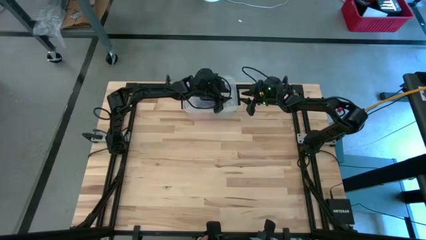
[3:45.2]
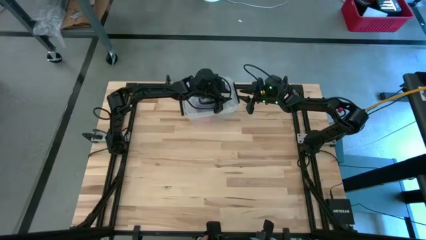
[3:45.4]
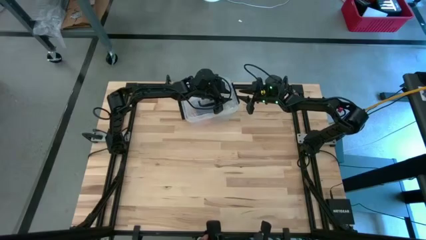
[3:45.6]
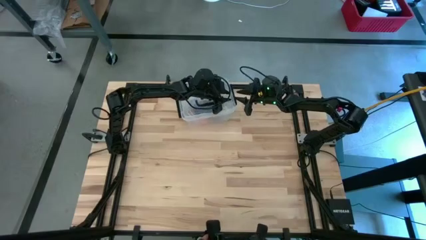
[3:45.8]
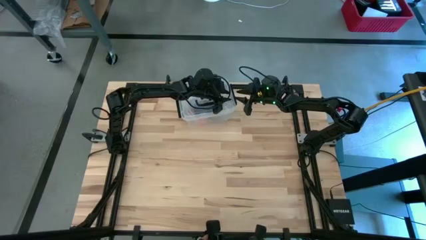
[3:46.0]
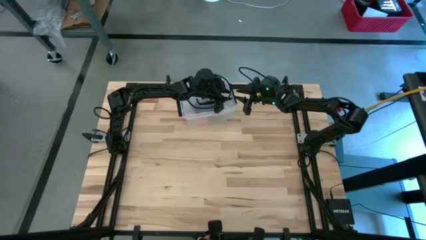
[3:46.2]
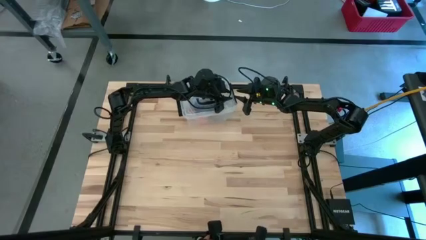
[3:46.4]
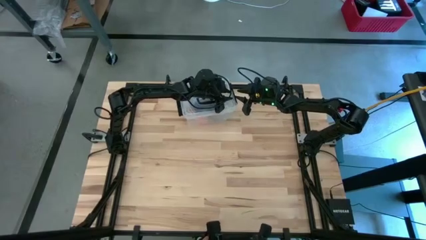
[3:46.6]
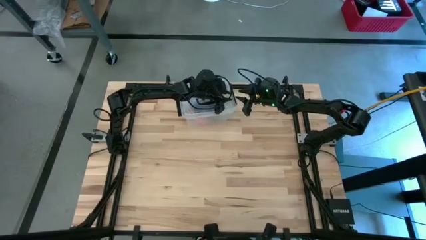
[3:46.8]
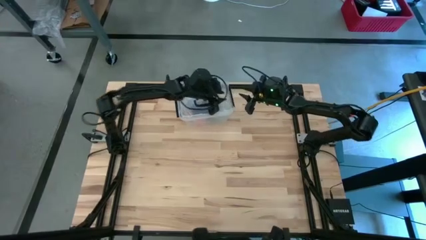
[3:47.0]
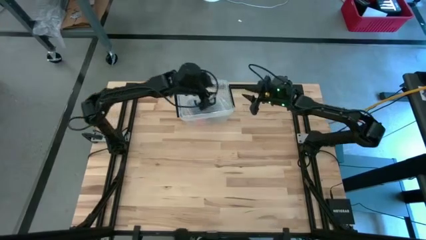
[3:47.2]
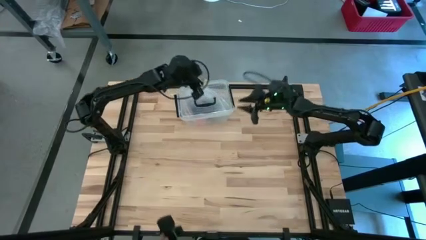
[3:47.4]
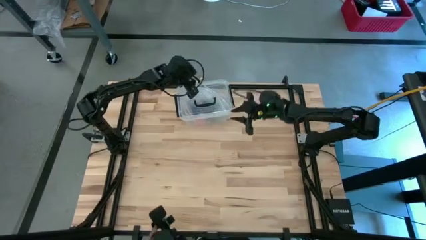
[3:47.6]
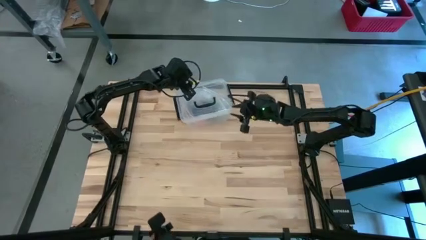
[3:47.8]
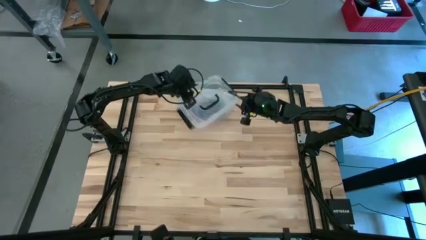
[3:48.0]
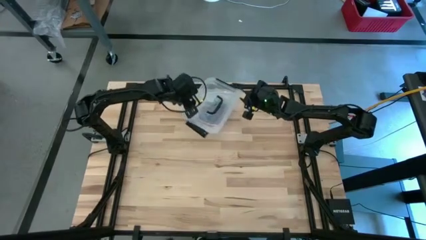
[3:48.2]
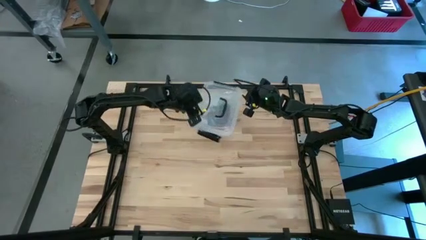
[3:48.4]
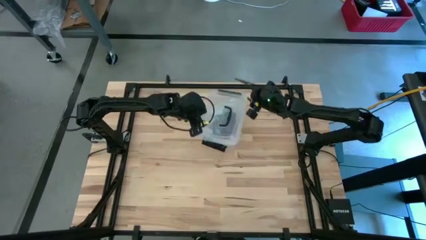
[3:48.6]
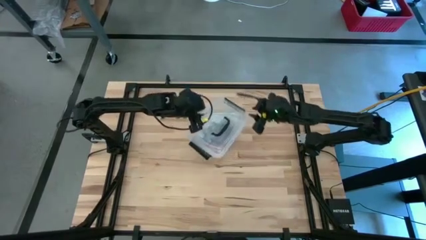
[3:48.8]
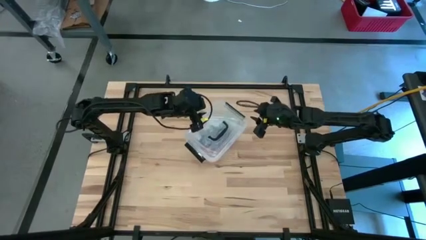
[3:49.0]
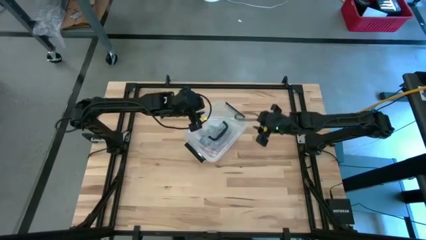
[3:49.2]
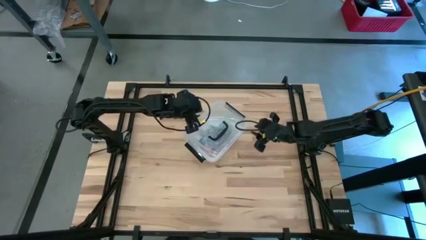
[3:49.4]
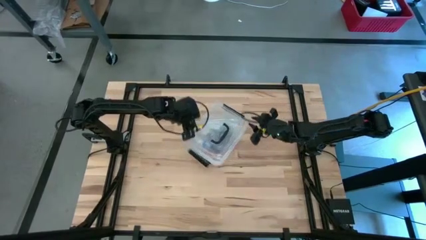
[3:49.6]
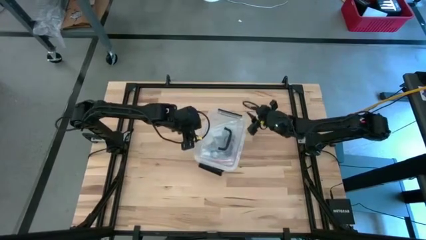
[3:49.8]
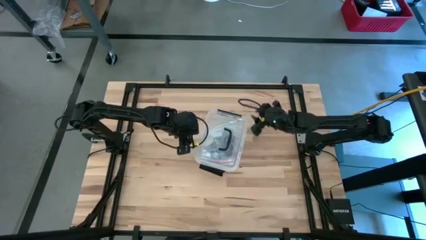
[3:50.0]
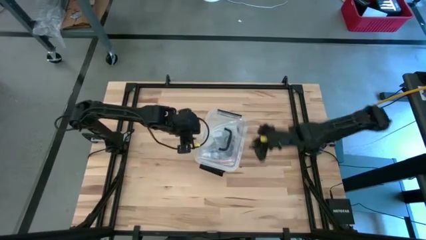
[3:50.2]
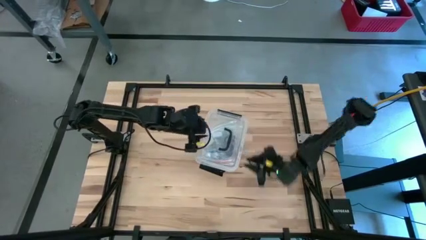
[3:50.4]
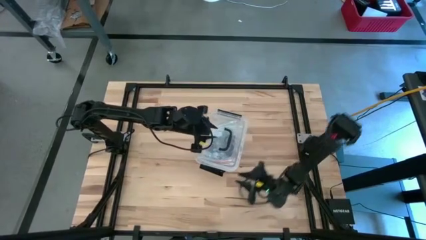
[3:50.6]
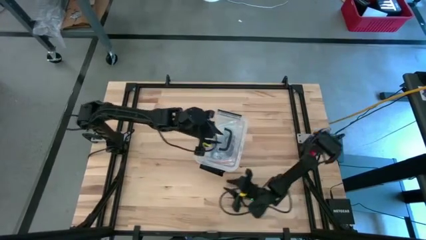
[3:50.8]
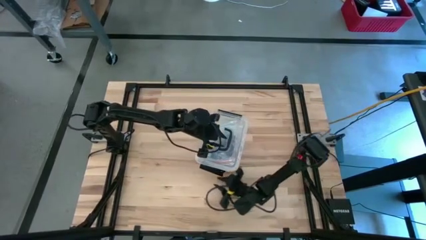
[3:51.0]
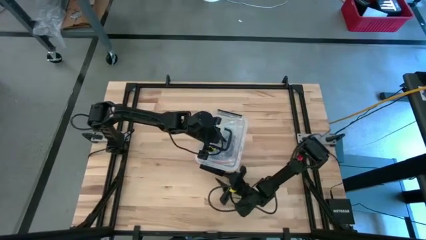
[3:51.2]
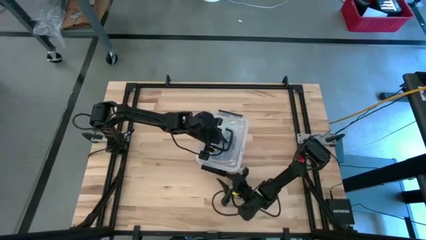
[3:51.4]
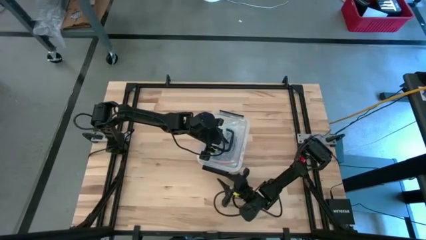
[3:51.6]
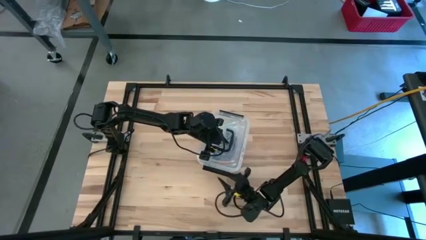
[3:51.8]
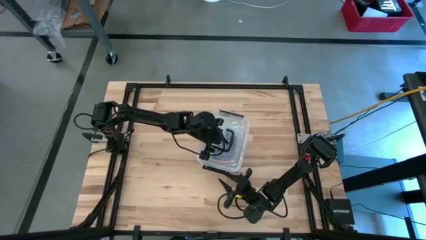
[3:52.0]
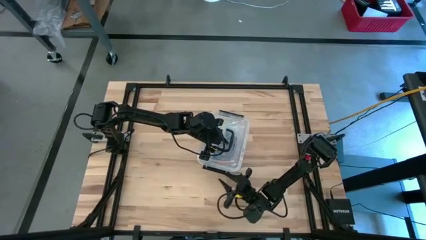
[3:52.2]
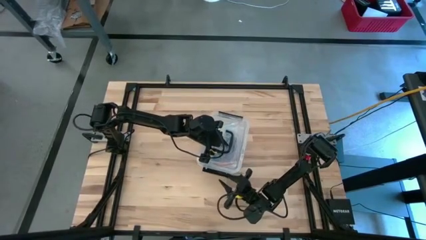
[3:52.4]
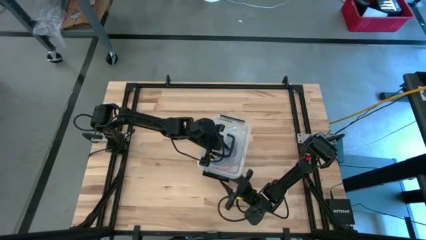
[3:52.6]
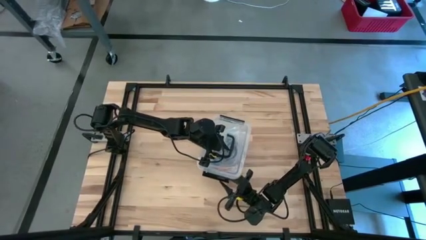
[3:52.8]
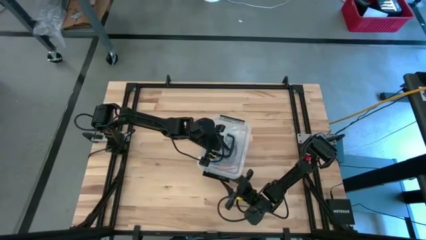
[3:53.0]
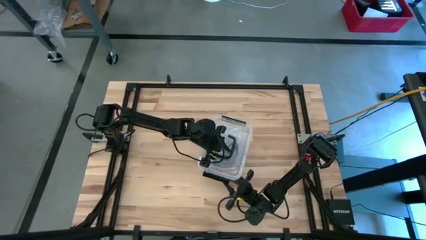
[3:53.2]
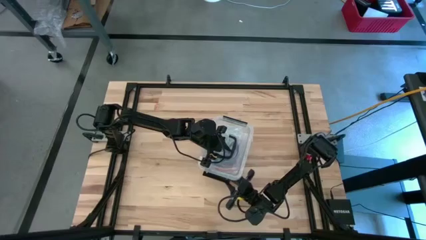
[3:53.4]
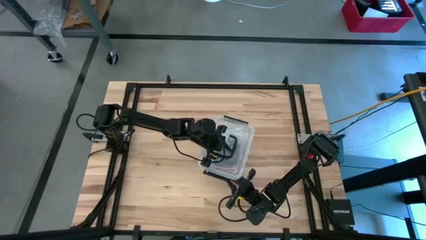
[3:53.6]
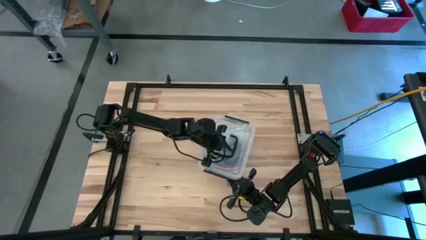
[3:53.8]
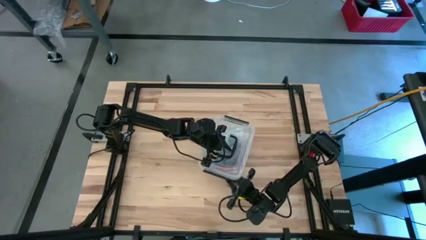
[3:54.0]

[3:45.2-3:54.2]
Task: Roll bandage
Close the transparent bin

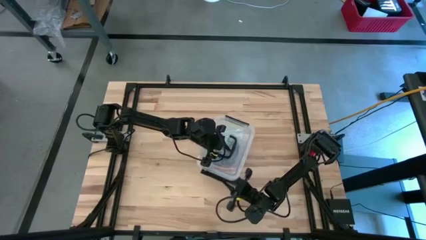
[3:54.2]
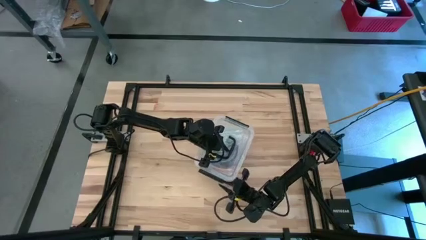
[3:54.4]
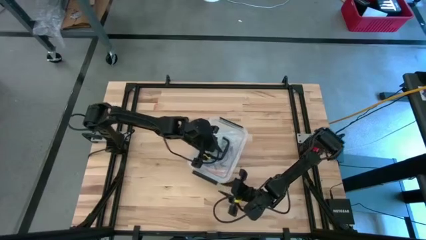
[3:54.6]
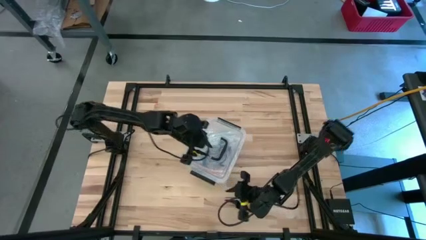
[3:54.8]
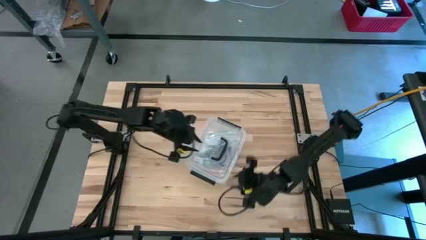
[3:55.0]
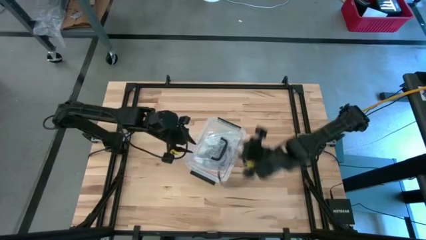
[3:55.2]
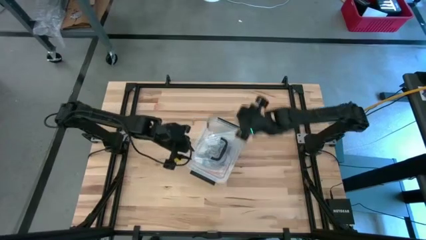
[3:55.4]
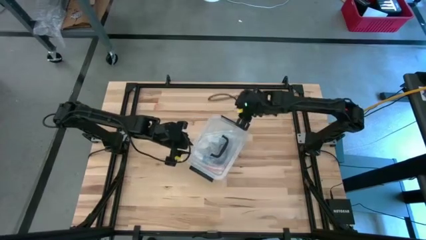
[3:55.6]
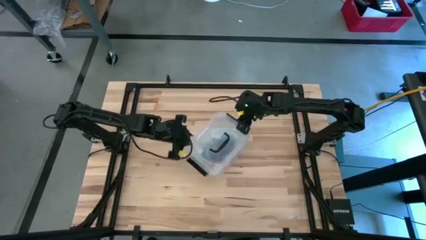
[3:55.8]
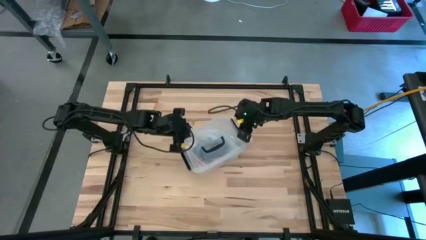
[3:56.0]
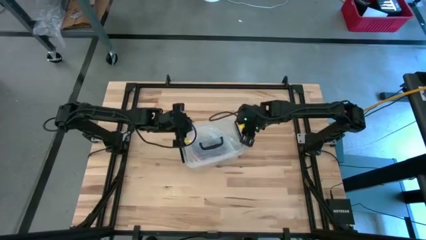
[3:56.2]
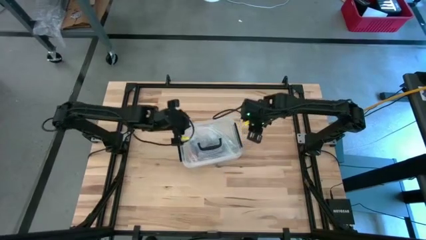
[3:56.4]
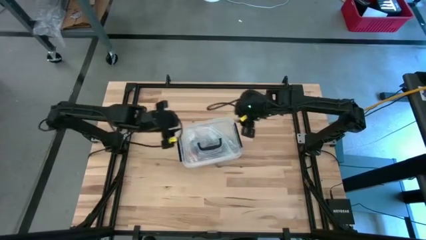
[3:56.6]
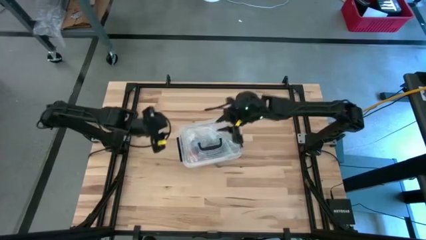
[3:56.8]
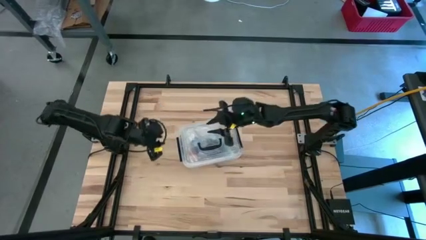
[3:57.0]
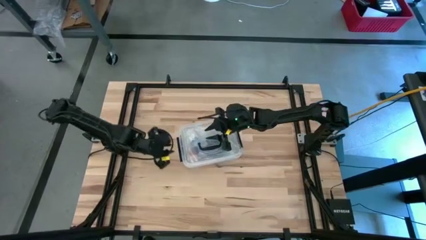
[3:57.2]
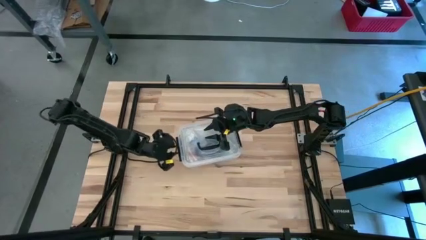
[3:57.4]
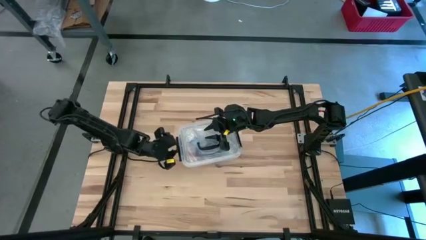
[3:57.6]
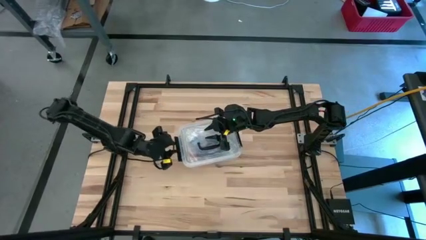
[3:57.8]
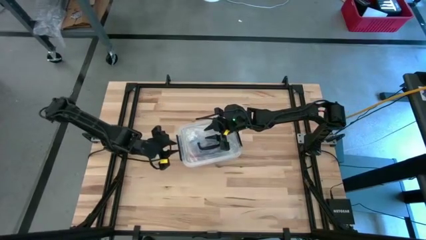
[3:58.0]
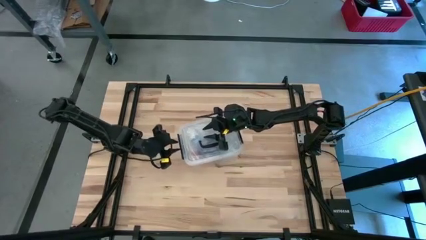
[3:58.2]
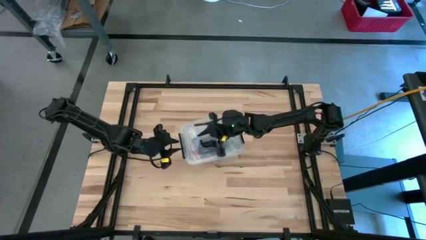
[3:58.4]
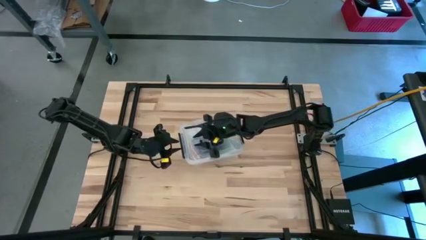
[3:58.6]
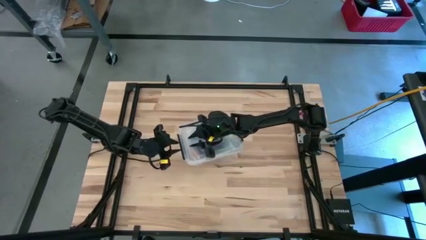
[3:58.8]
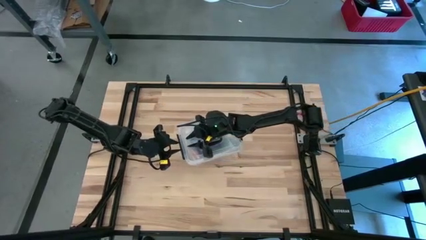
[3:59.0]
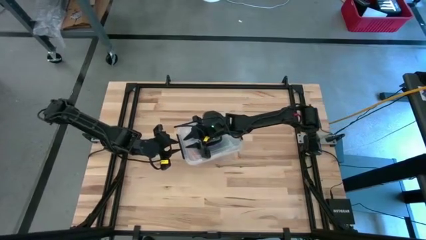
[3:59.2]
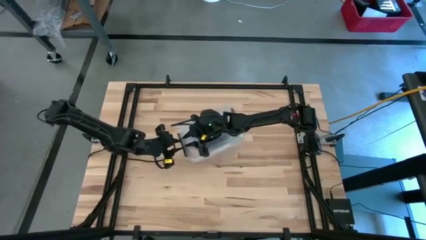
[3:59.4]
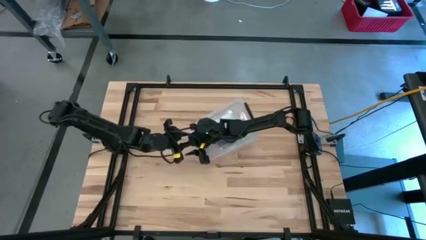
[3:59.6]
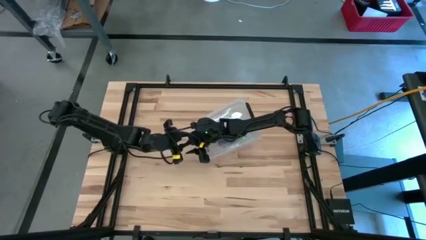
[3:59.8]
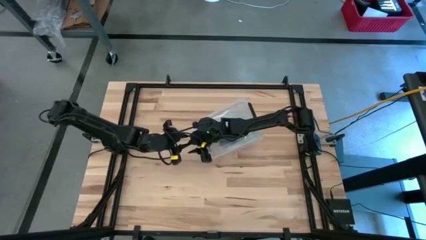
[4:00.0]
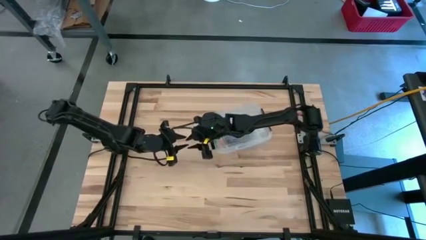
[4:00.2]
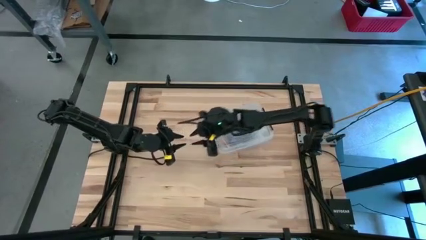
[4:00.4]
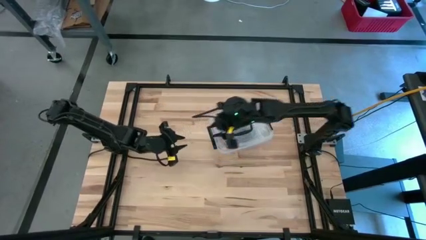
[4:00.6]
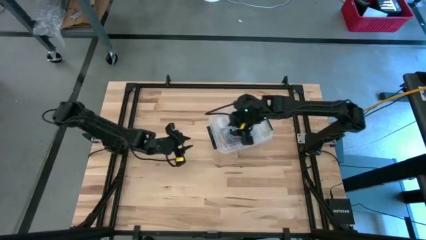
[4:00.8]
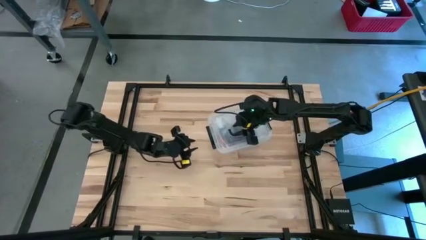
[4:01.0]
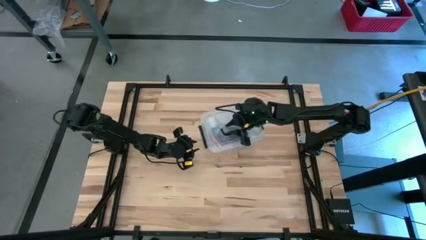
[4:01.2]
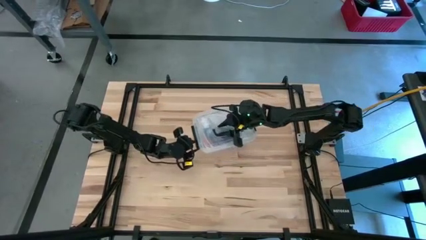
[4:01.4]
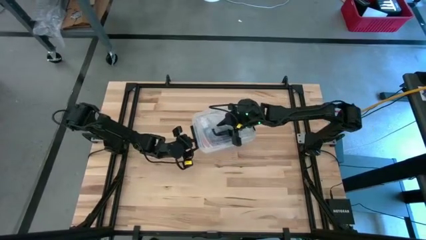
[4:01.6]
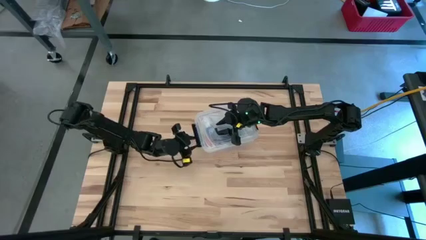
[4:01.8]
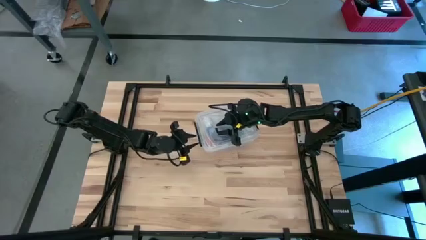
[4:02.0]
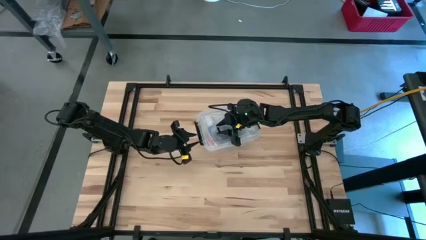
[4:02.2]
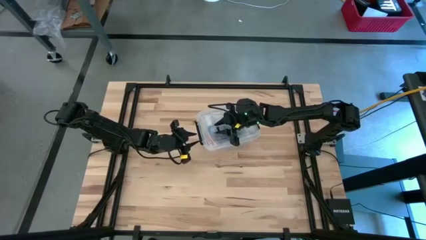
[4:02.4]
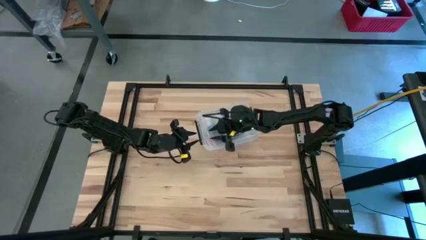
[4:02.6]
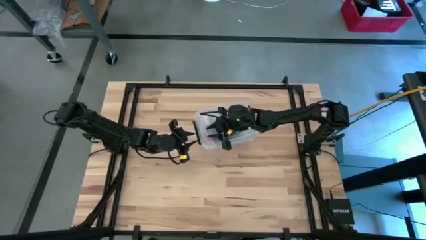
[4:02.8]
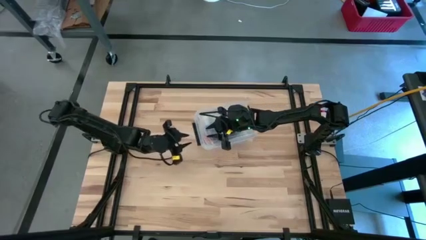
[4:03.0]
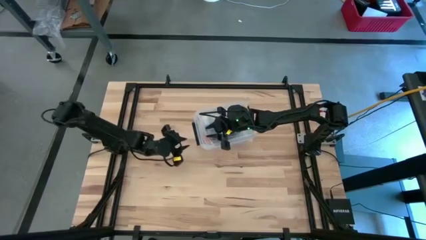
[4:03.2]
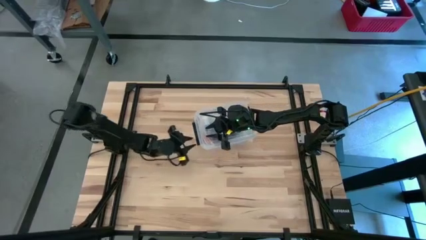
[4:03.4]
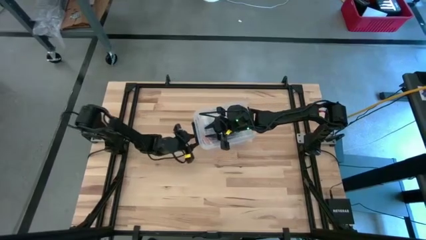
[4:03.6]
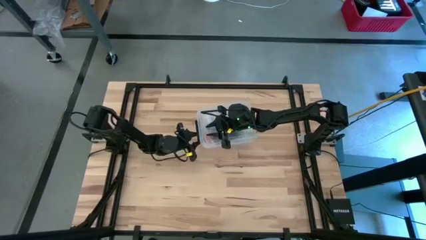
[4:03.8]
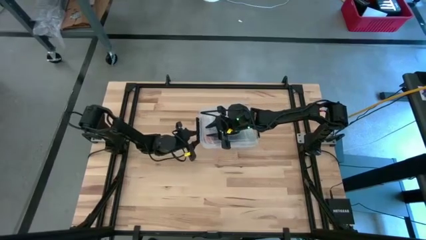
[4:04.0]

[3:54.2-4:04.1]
Close the transparent bin
